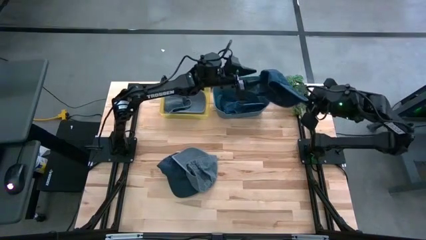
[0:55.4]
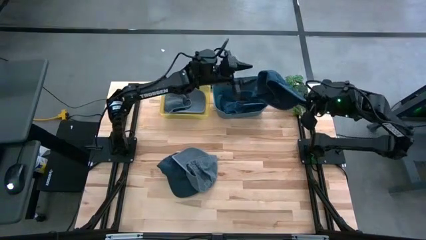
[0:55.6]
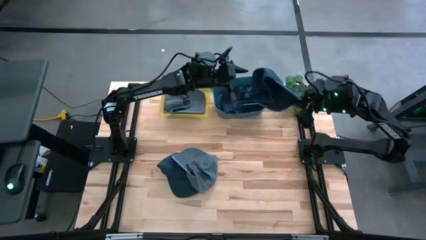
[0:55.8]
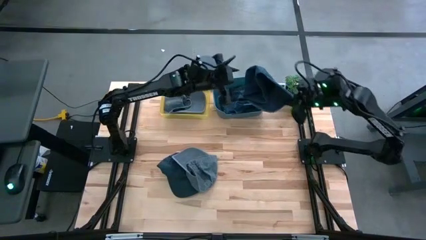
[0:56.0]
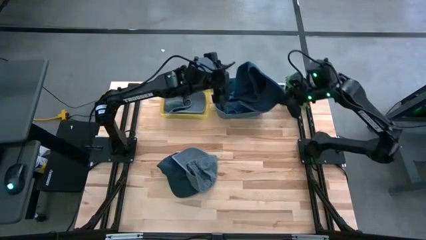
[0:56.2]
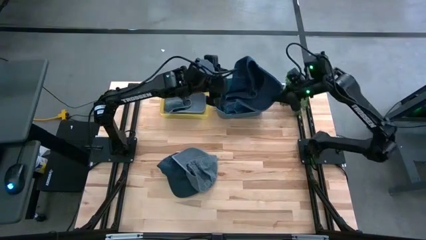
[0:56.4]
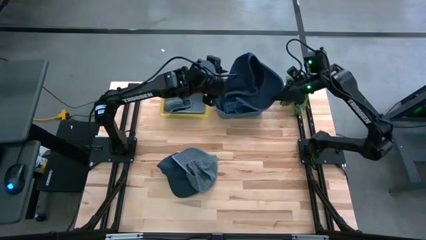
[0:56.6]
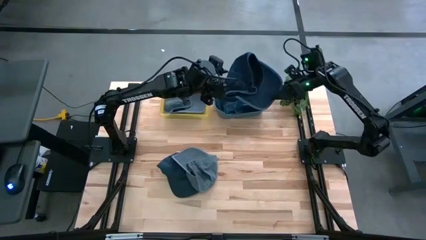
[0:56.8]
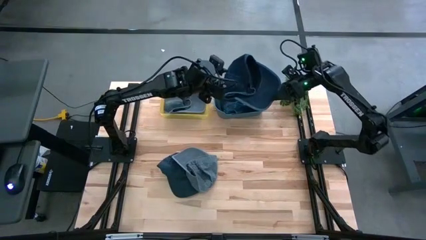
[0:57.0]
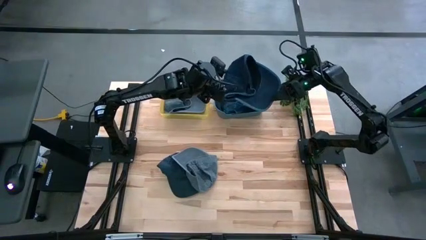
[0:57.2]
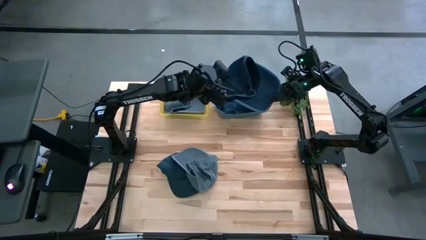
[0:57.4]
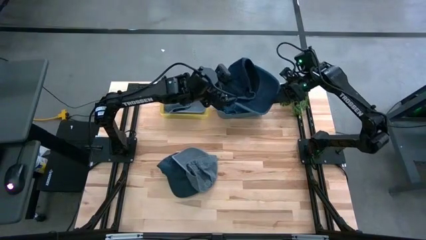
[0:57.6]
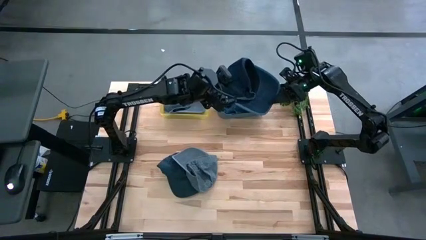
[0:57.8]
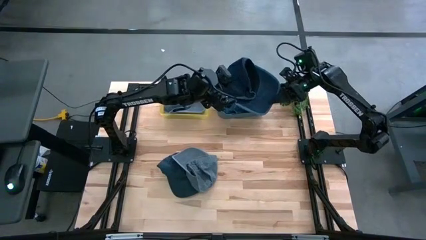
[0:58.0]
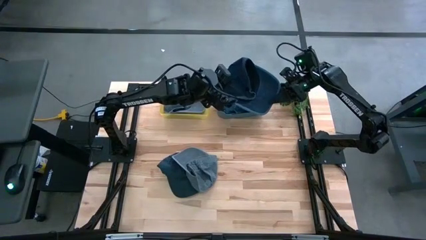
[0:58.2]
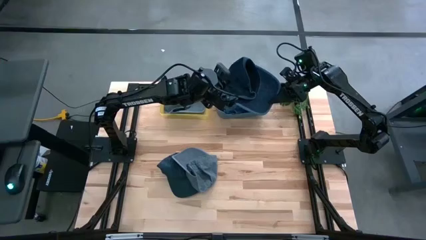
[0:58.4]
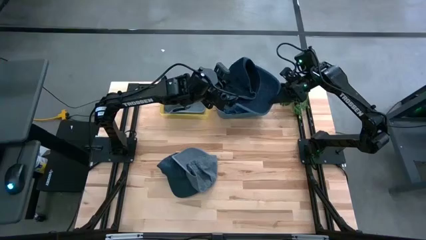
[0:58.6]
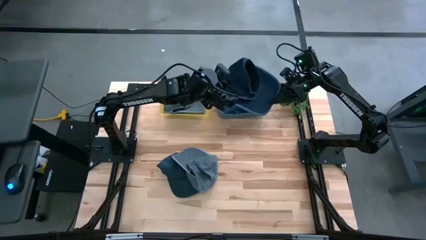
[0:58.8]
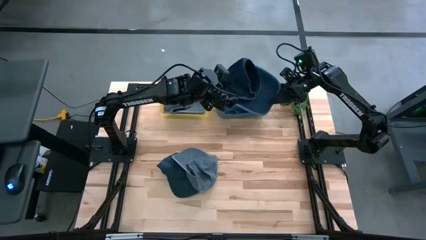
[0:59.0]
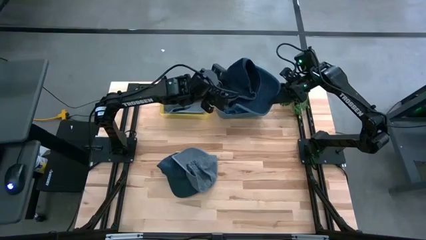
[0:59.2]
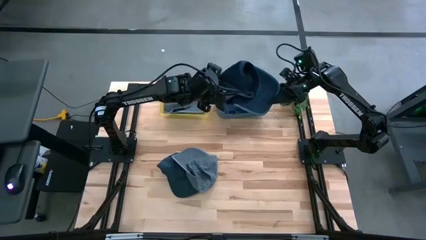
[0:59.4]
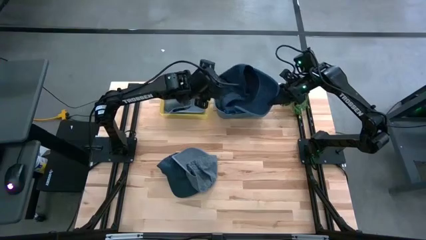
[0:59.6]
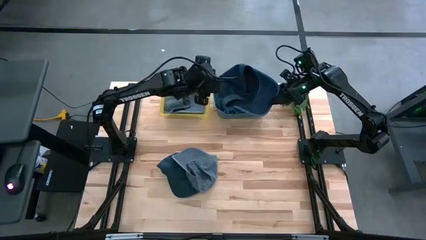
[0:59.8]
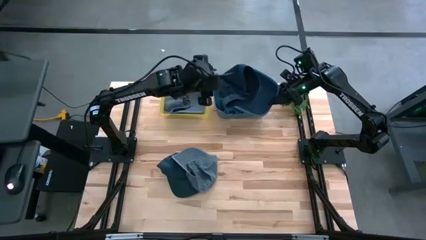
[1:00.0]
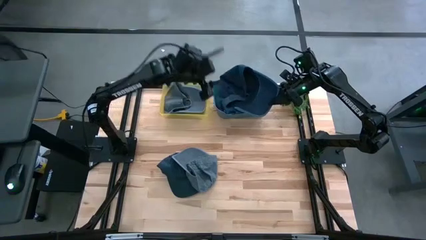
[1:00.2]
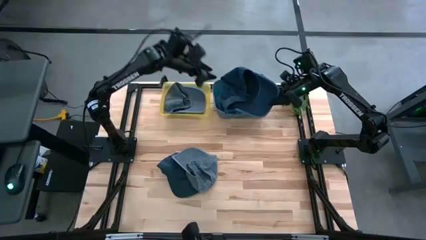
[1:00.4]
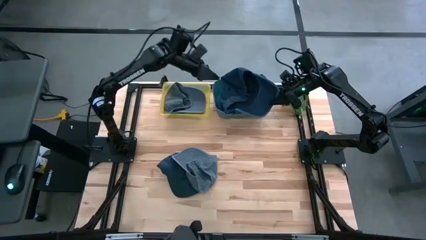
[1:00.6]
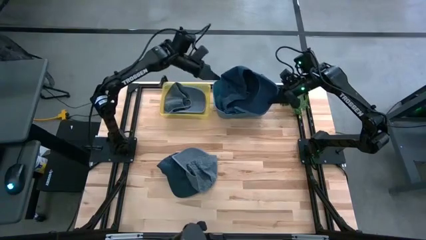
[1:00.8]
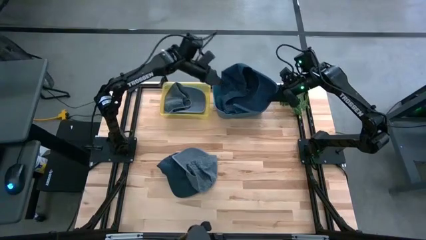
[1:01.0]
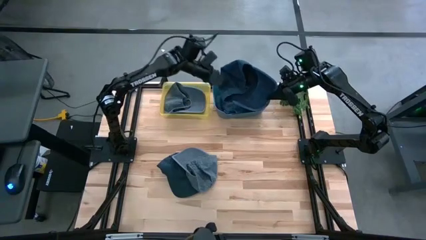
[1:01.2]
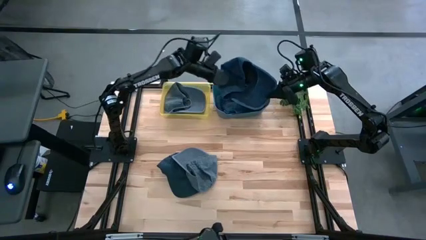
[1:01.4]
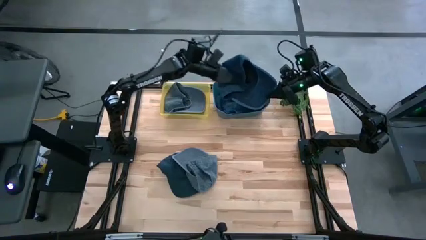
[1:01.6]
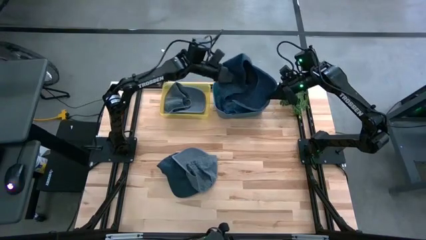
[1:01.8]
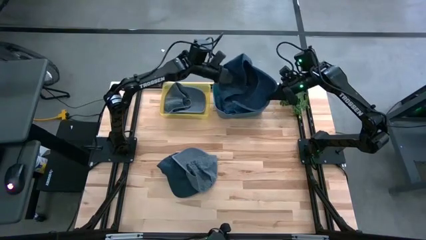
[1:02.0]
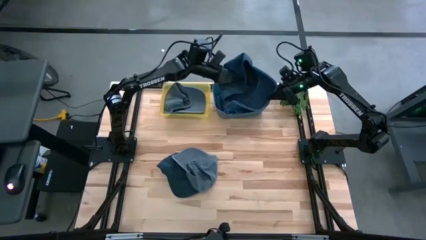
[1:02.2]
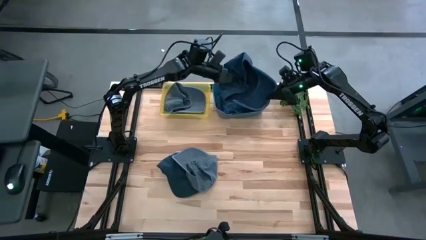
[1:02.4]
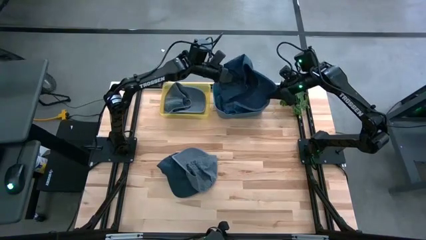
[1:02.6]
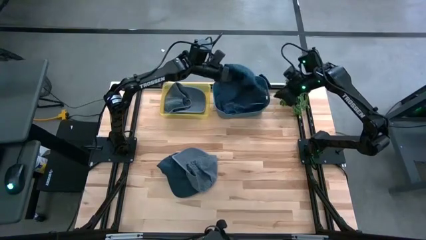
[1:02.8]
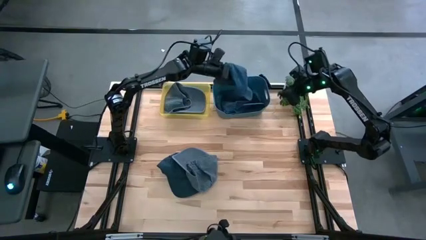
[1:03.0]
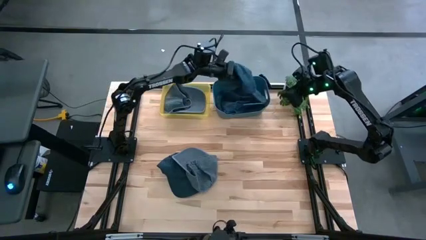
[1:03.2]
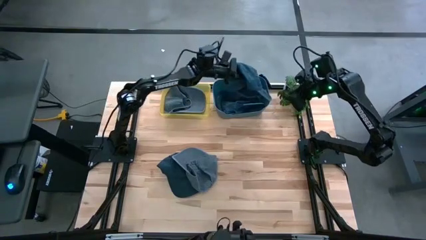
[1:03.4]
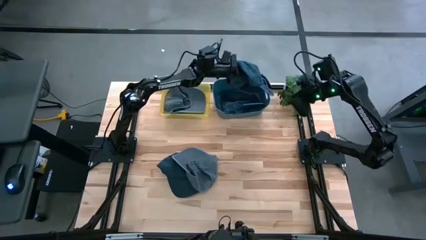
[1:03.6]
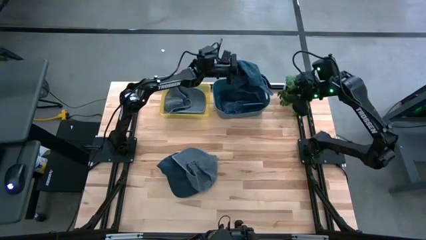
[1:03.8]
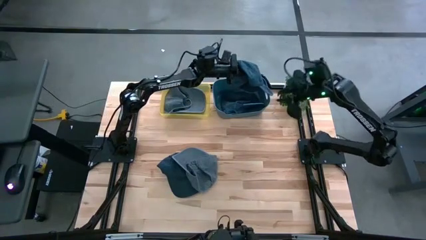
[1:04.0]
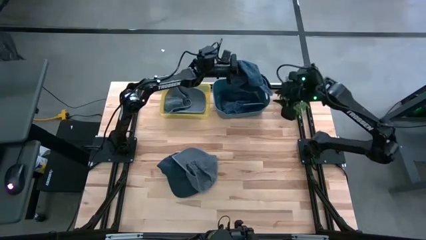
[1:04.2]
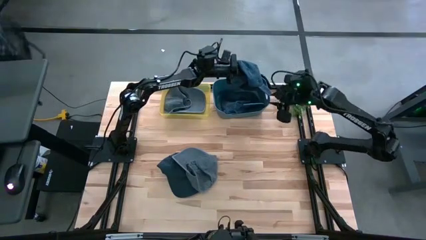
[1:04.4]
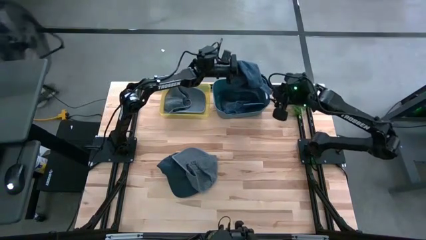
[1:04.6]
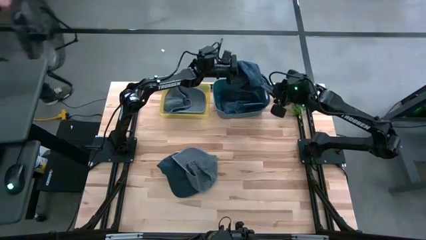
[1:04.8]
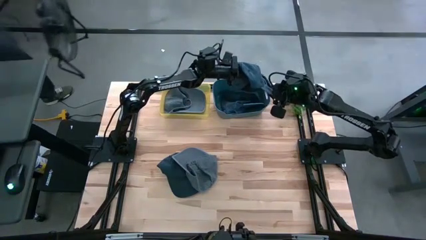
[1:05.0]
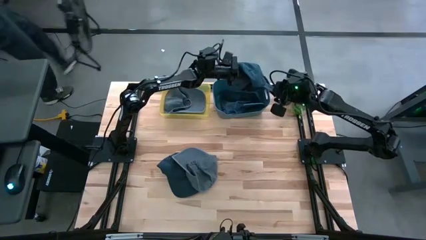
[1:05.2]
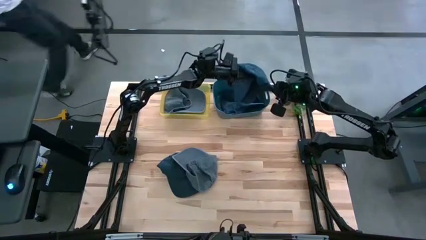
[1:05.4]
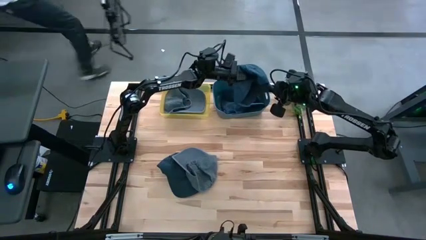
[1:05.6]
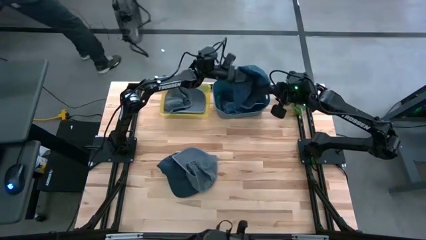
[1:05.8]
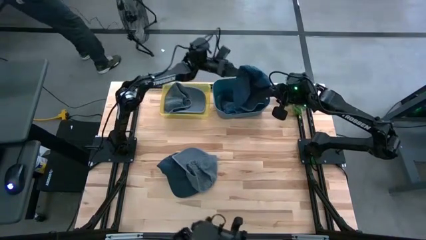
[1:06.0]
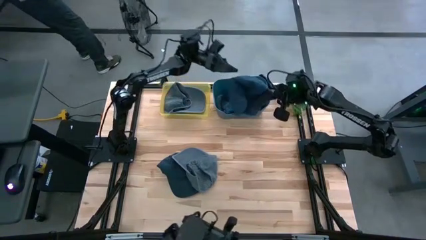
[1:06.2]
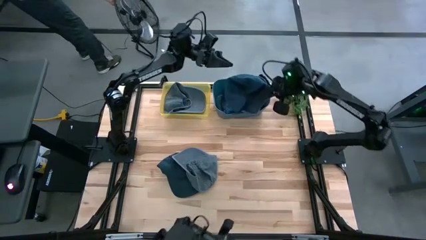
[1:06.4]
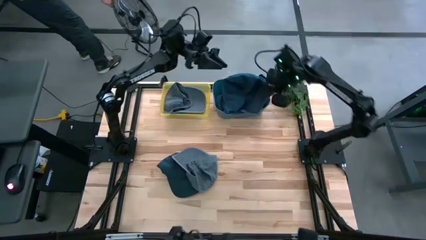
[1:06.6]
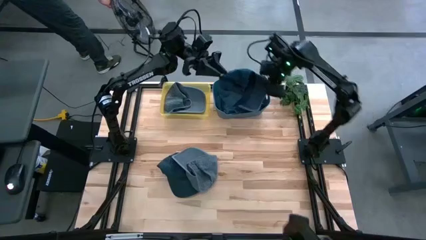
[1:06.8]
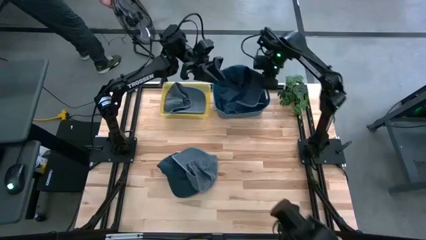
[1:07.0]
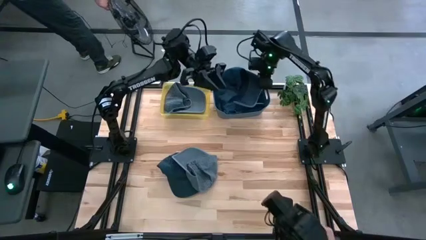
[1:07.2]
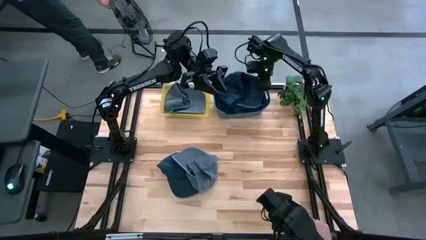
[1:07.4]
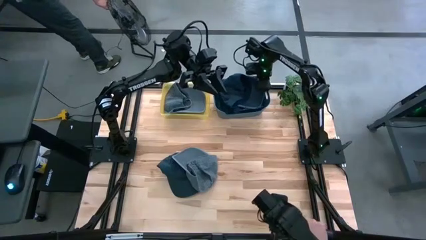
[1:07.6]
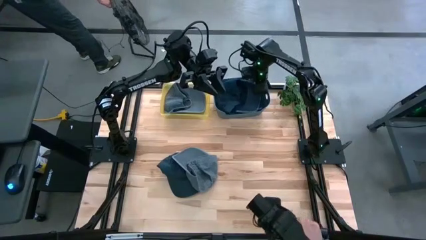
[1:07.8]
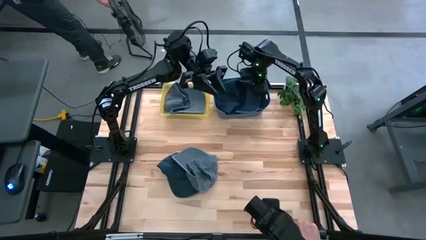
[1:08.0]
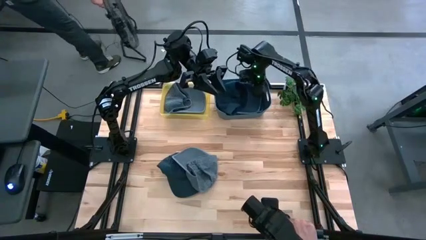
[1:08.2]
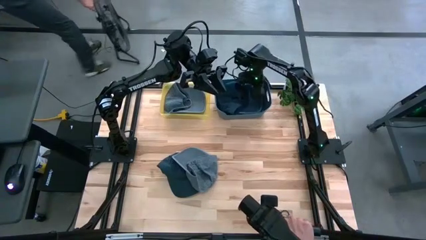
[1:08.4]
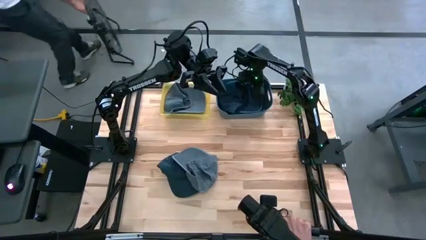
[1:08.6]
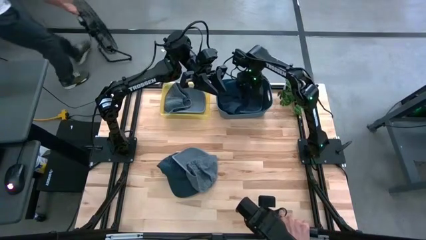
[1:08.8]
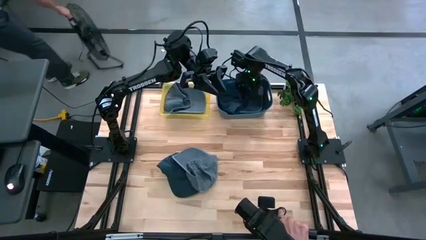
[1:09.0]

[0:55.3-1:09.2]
Task: Pick & Place hat
Put the right blue cap into the blue bin

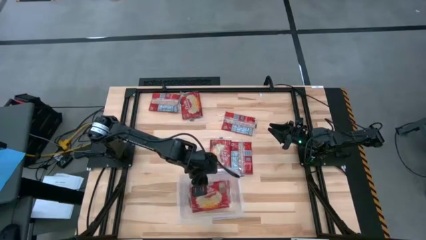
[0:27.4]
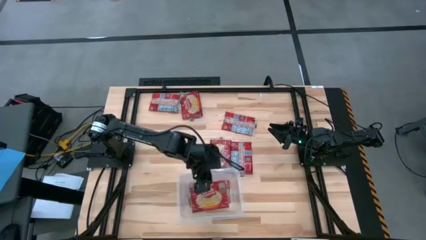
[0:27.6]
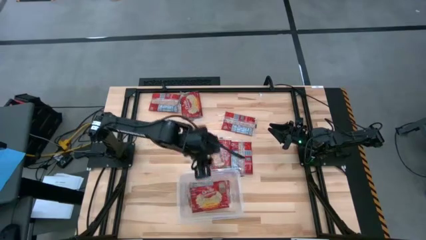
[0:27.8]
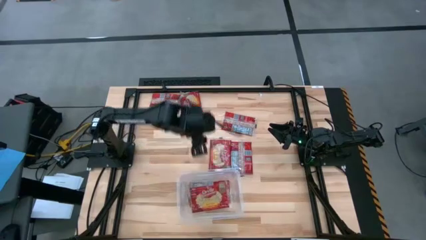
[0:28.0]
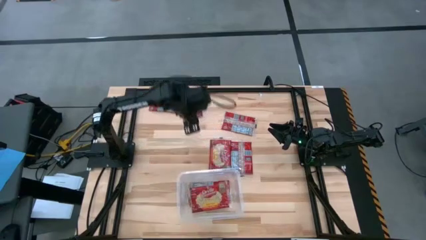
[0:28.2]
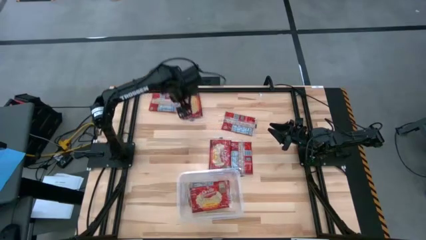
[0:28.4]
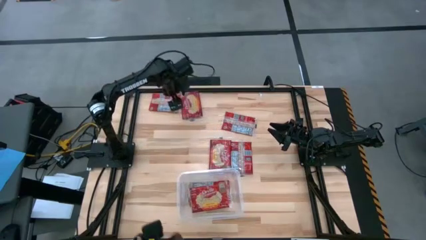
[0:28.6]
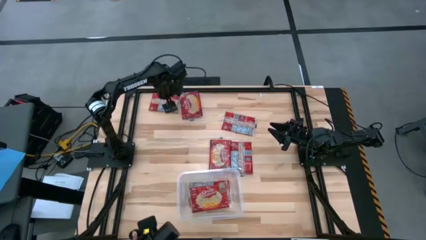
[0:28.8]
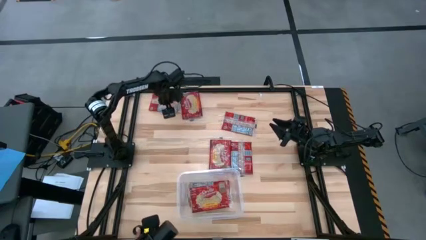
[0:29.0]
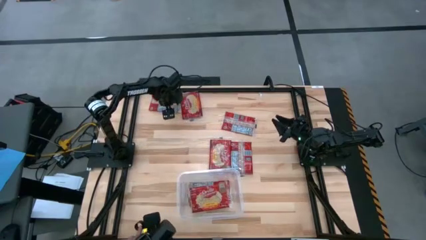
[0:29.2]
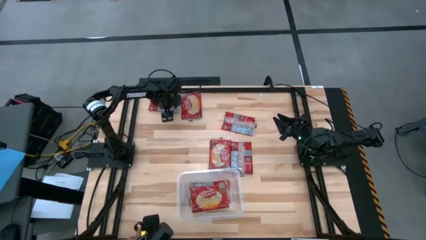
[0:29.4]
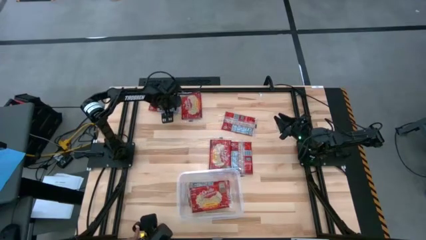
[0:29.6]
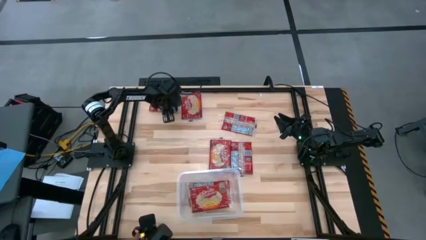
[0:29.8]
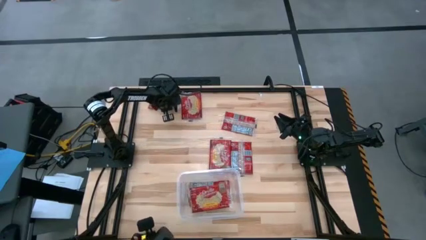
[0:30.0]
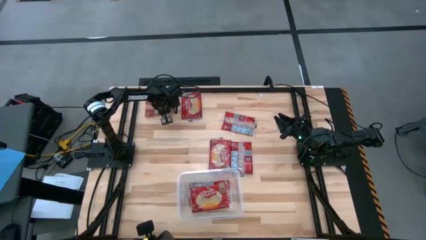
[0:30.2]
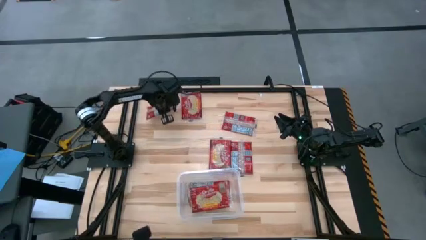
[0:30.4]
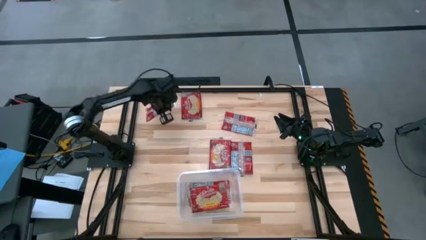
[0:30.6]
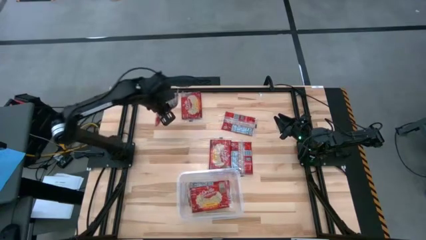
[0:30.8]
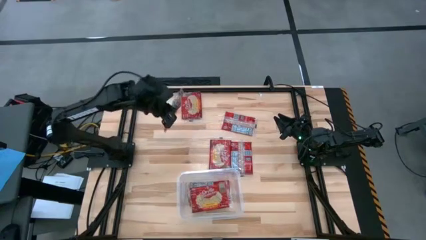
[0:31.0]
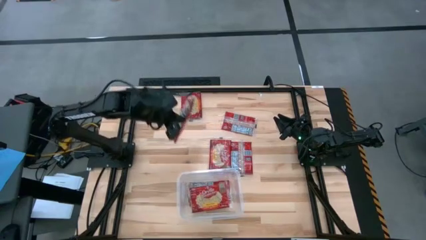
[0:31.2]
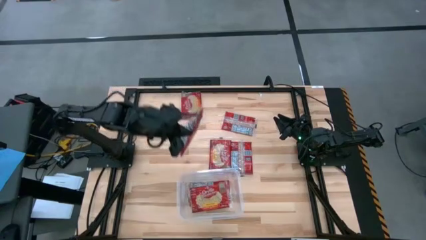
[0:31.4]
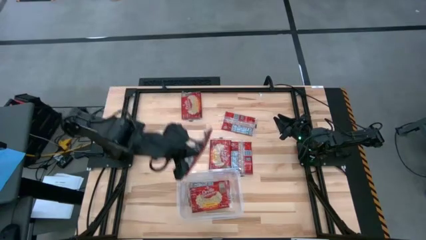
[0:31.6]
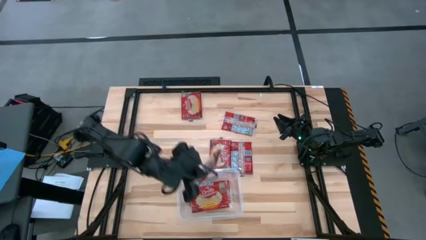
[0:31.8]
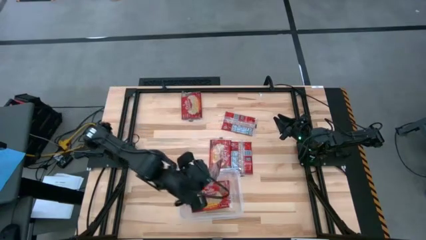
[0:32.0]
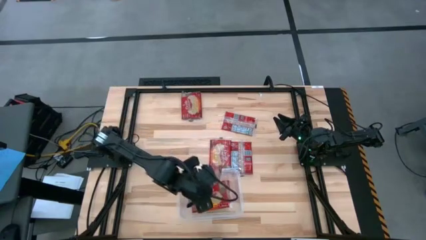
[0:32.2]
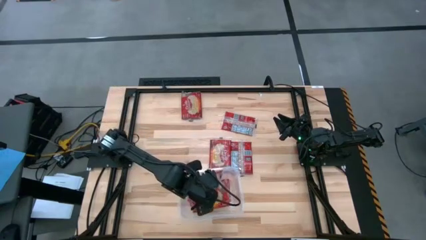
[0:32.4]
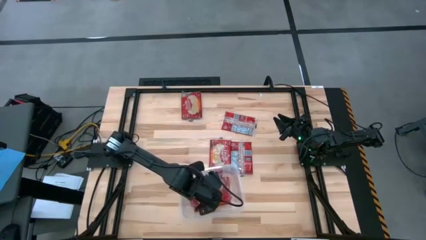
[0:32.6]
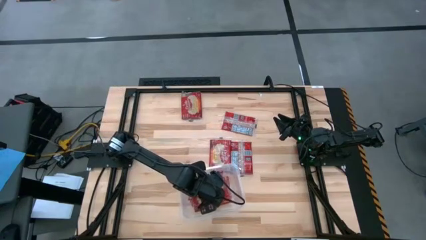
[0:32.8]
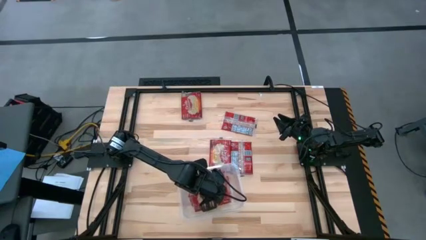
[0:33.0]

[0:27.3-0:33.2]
Task: Sort popcorn bags into baskets
Put the red popcorn bag into the transparent container
